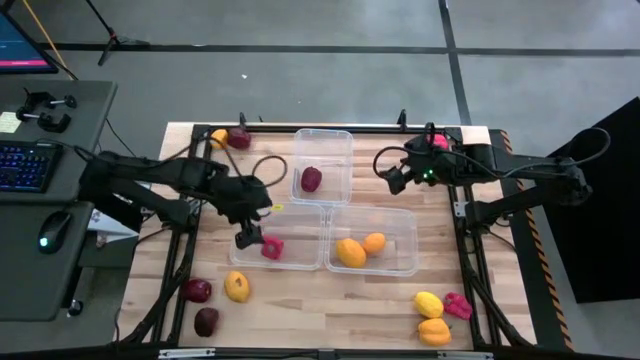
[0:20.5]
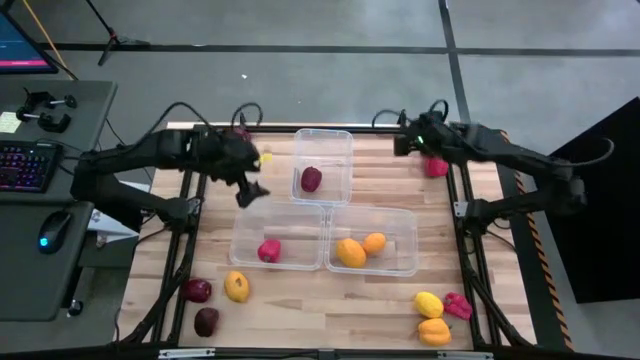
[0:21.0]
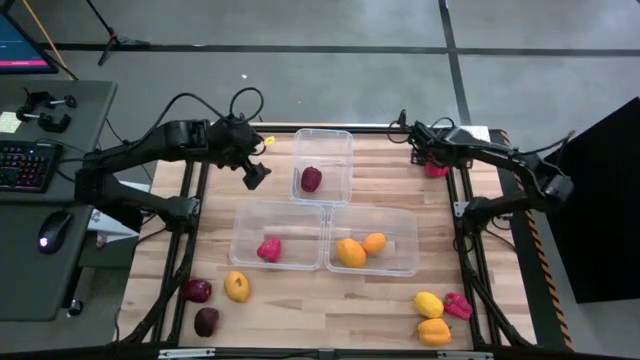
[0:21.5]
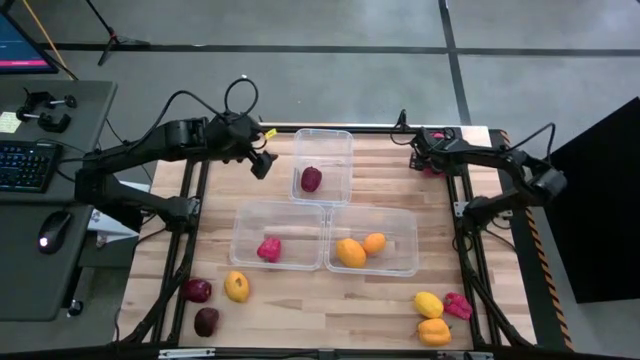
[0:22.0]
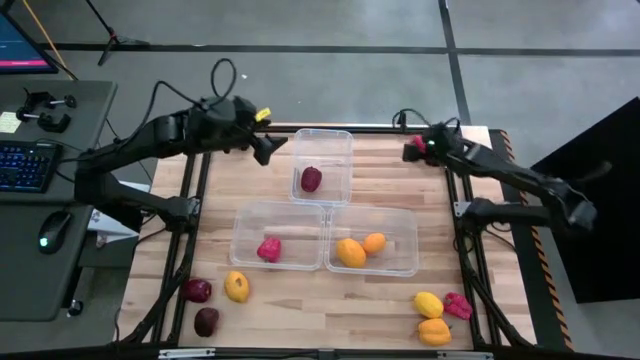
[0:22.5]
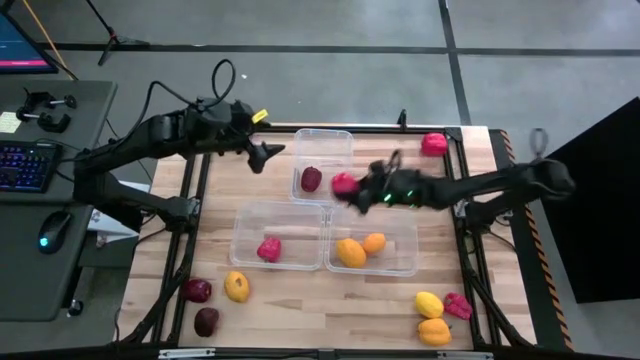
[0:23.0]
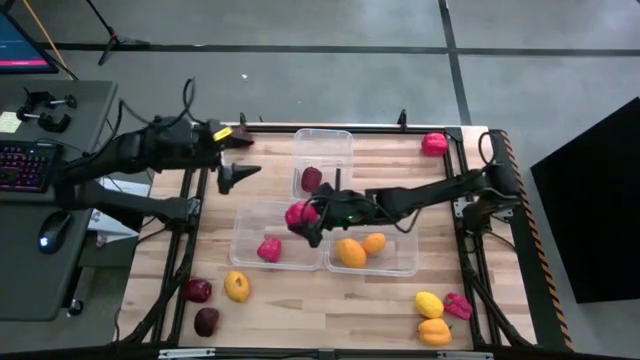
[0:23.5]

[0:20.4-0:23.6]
Task: Sort produce into baskets
Put the top right red bell pepper into the middle left transparent bin

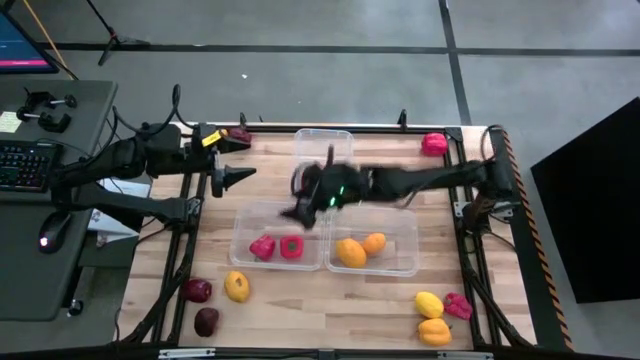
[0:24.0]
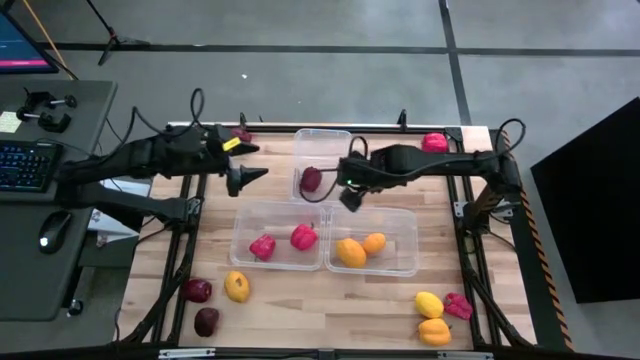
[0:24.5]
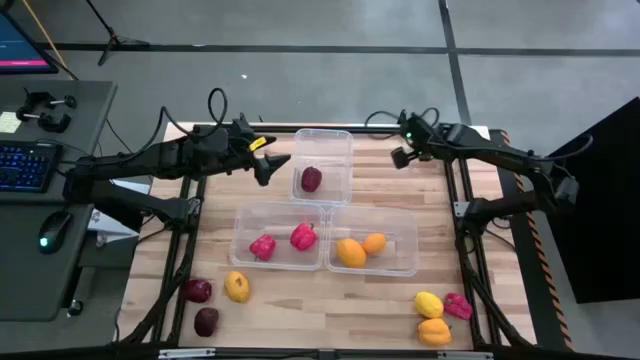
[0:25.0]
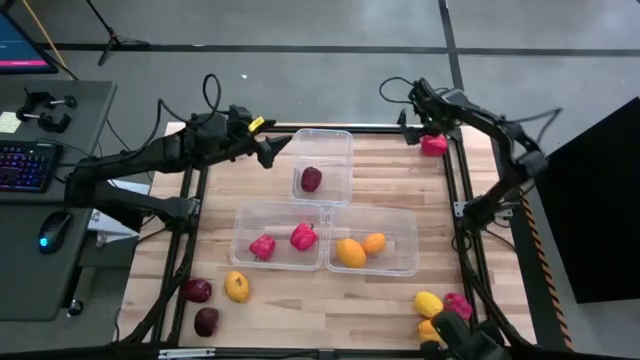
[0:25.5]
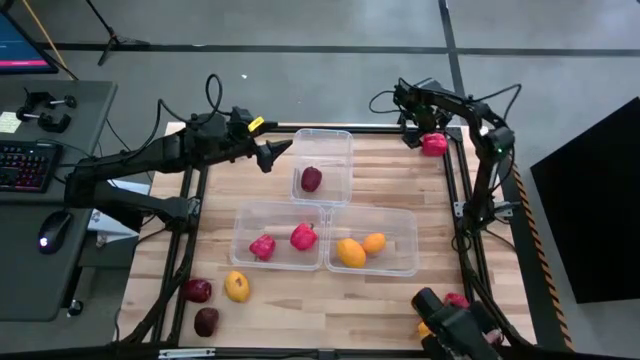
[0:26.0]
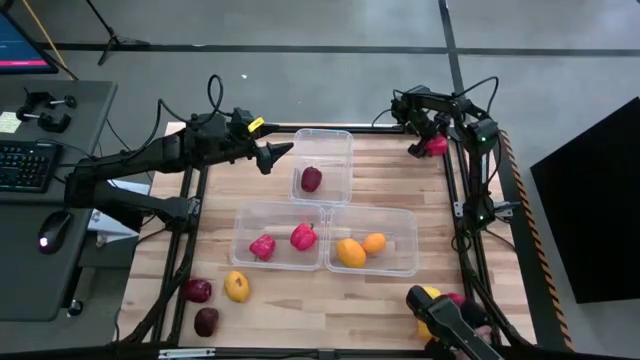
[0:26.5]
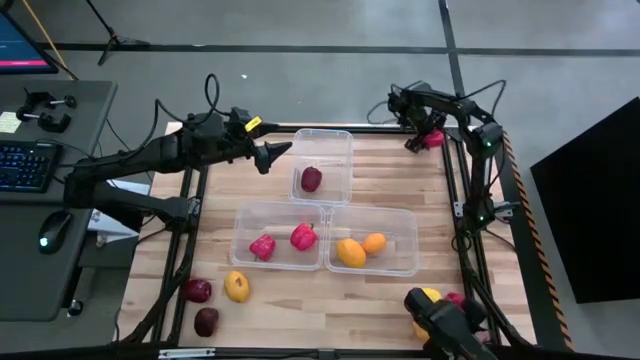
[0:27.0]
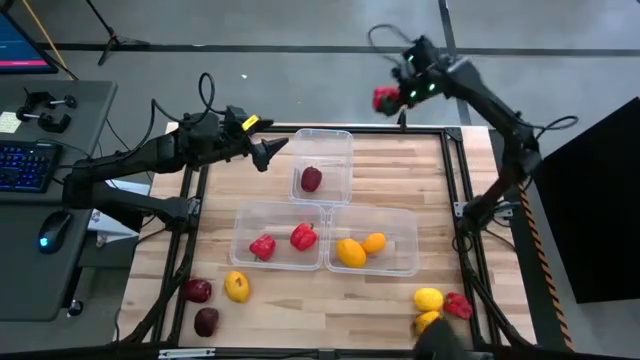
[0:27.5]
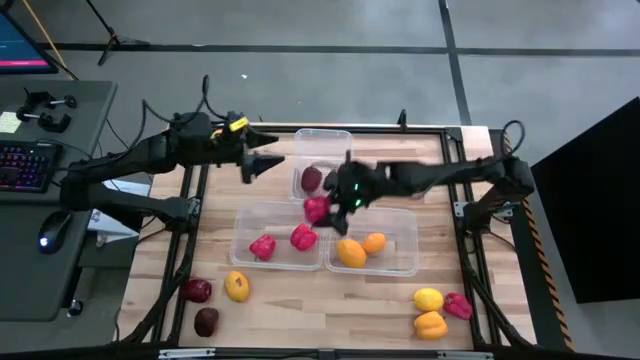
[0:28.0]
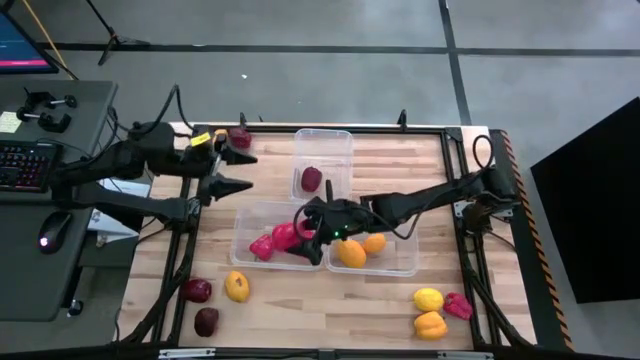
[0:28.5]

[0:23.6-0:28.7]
Put the top right red bell pepper into the middle left transparent bin

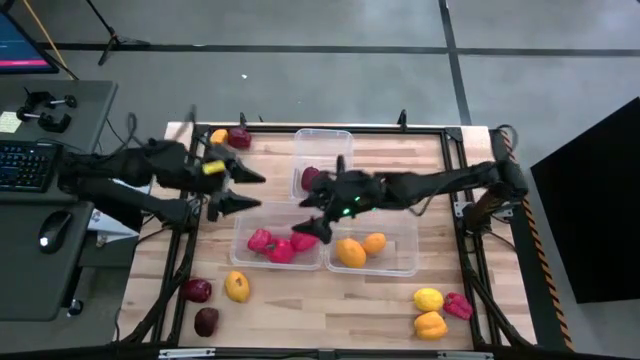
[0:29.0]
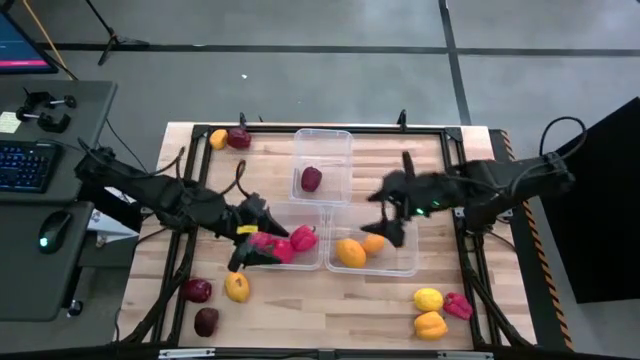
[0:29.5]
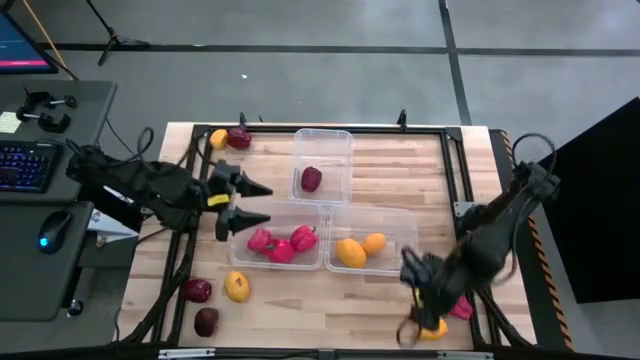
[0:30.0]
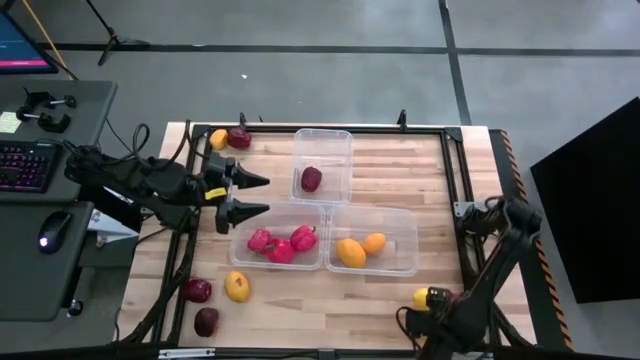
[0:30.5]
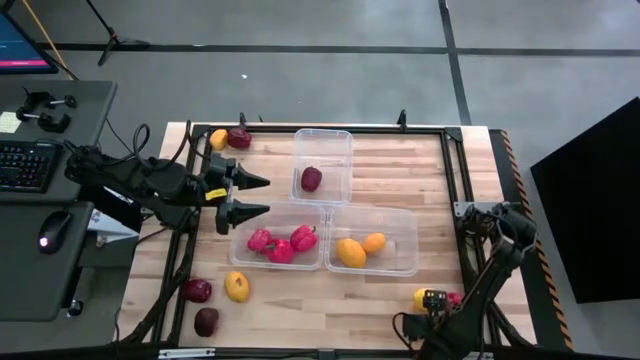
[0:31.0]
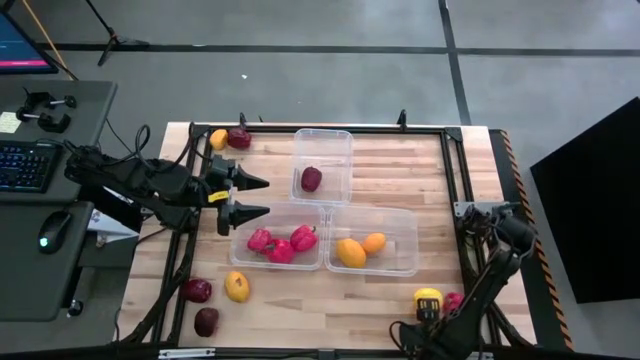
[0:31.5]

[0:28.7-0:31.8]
Put the bottom right yellow bell pepper into the middle right transparent bin

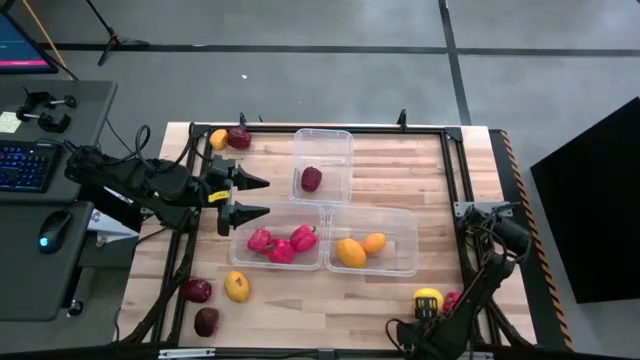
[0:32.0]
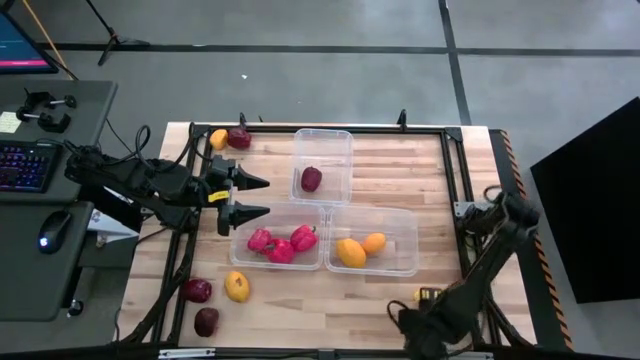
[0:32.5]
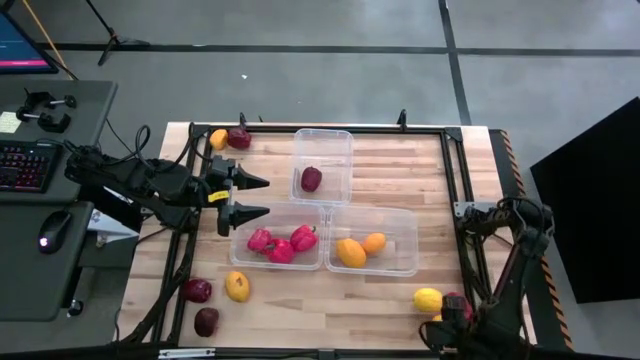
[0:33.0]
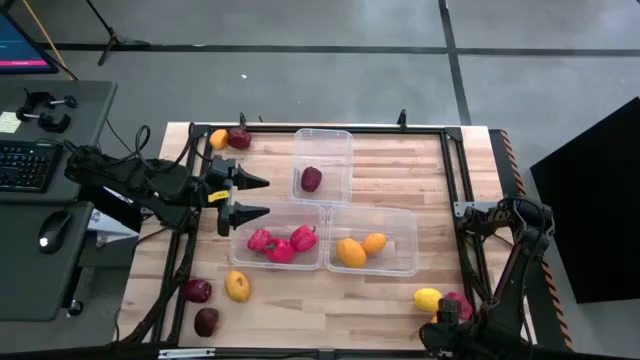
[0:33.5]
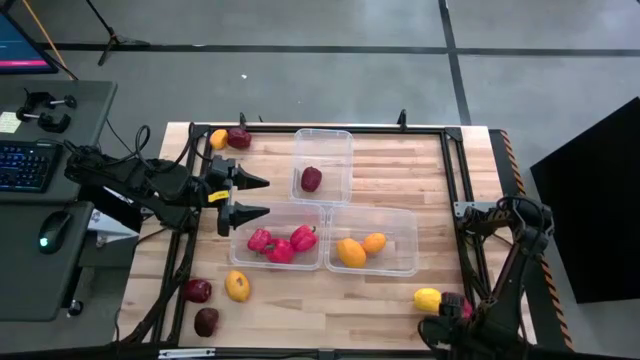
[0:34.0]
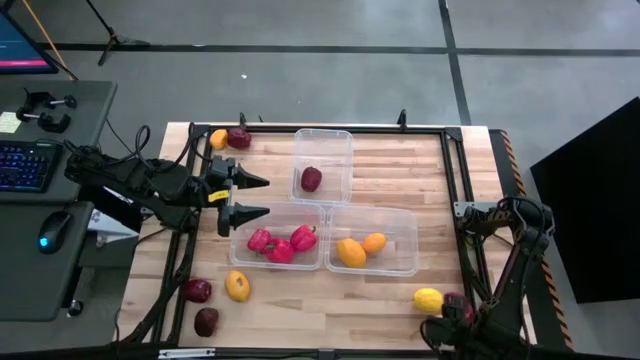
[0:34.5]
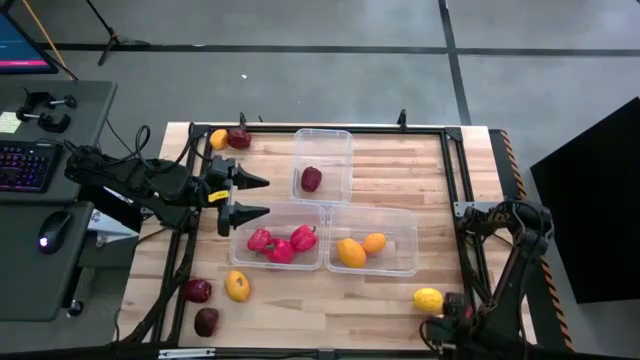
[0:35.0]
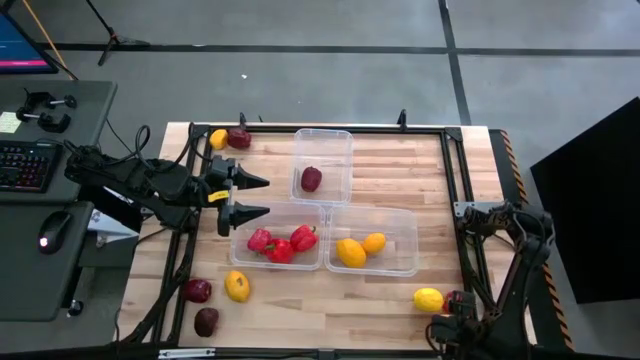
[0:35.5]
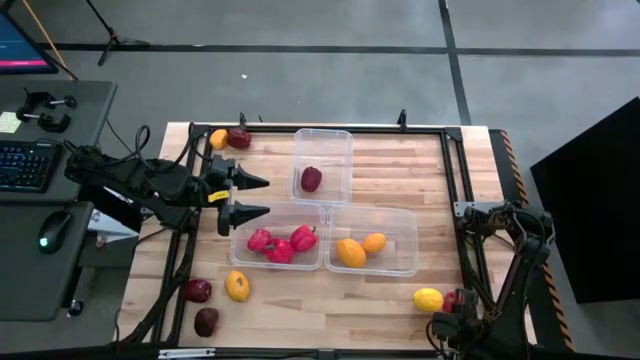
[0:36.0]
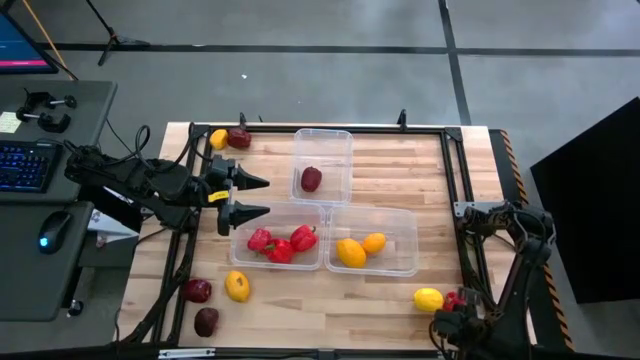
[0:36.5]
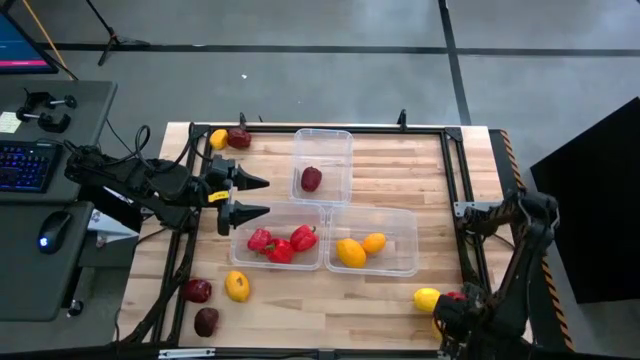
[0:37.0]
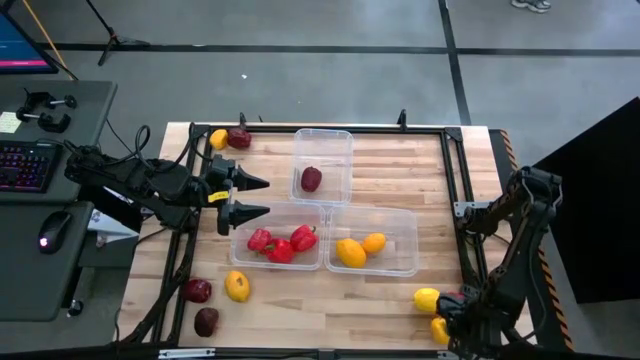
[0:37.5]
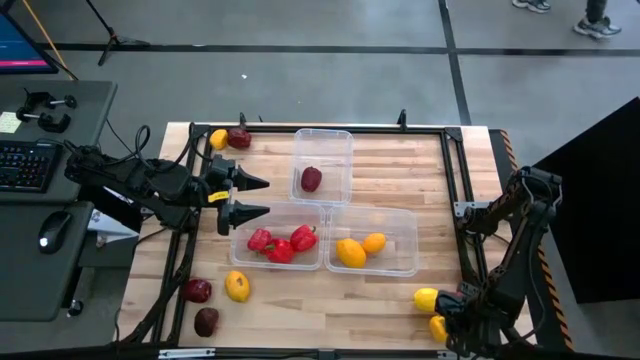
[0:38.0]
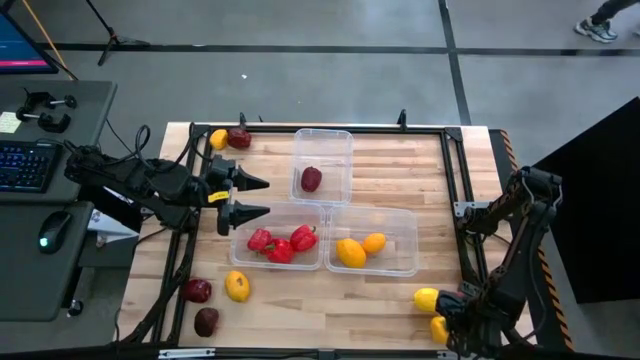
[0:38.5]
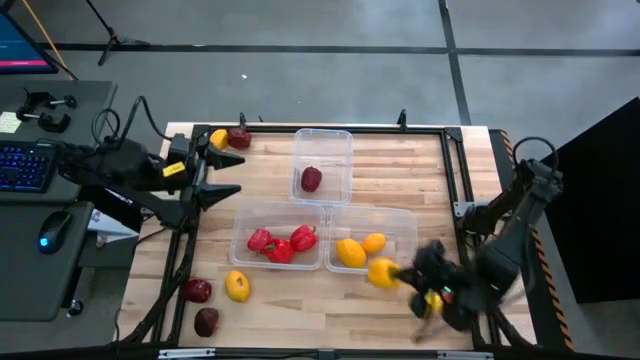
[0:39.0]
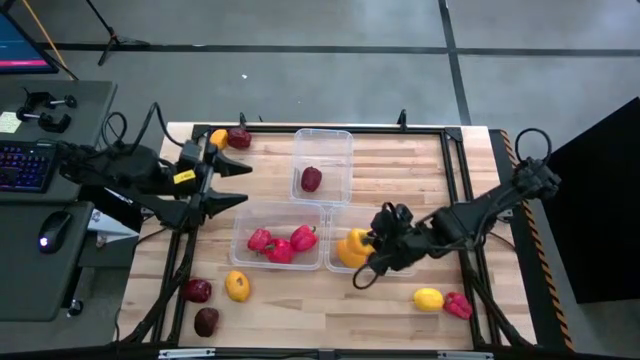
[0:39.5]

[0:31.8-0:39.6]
Put the bottom right yellow bell pepper into the middle right transparent bin

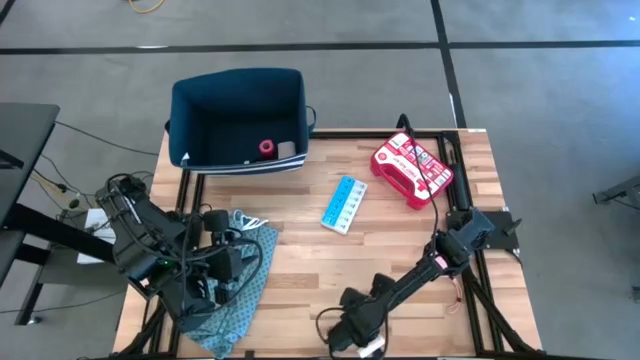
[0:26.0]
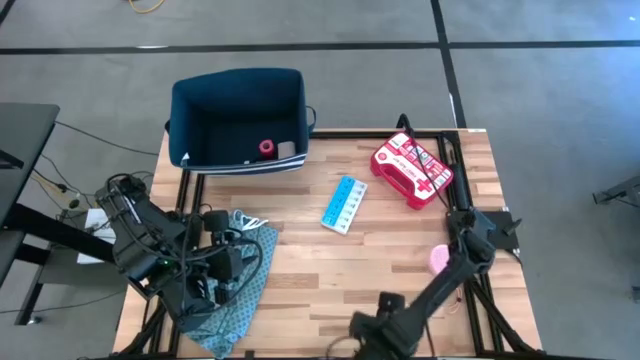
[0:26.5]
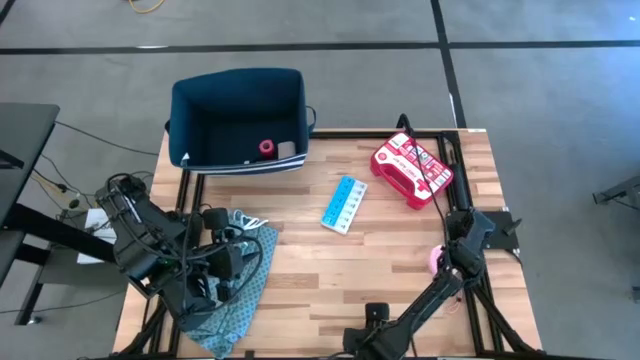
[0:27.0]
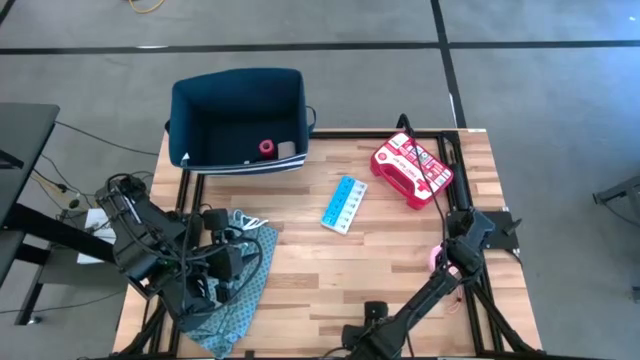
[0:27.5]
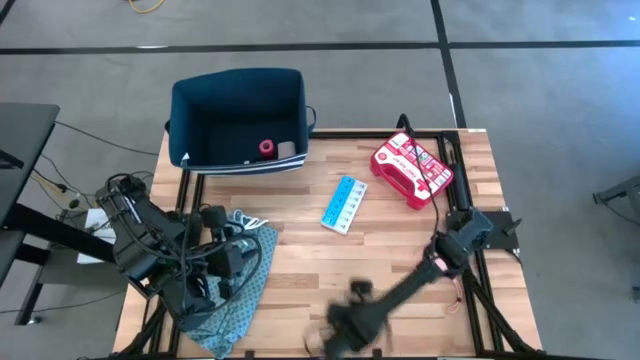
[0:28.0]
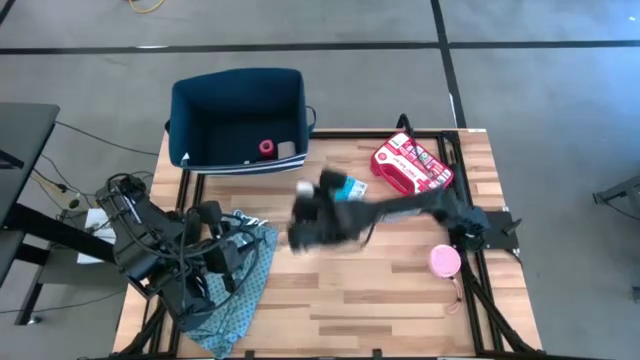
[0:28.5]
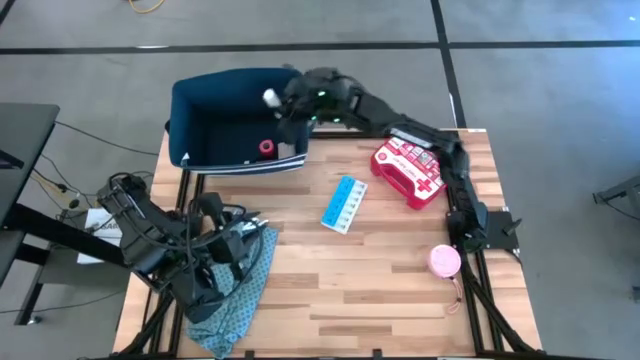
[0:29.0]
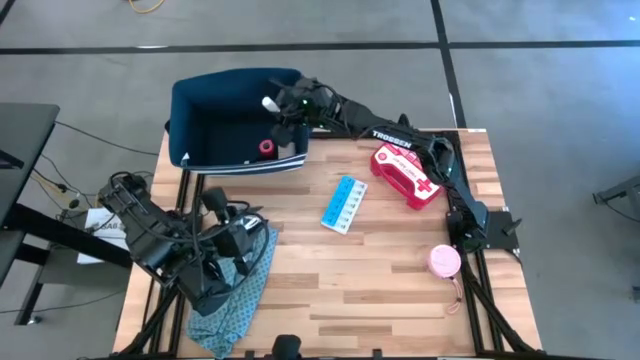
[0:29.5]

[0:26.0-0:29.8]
Task: Pick & place medical supplies in basket/bin
Put the white rolled gauze into the blue bin
